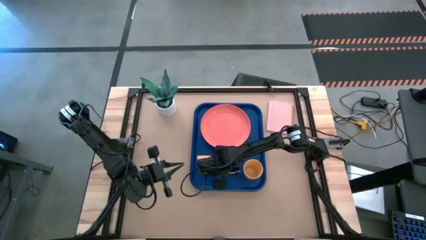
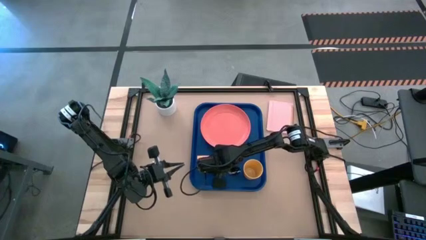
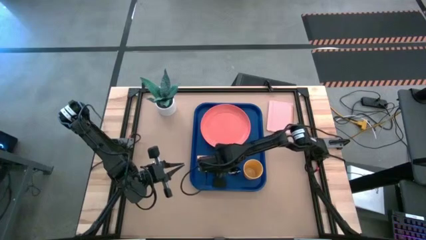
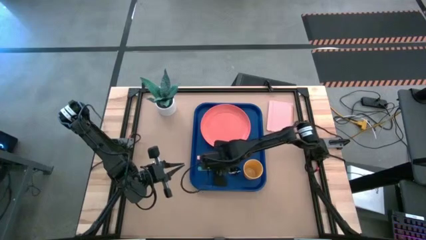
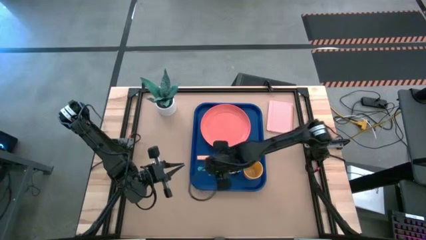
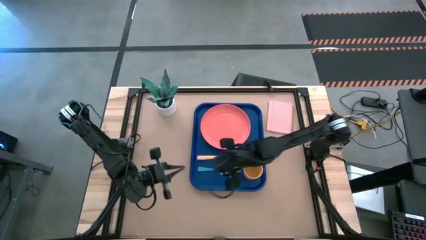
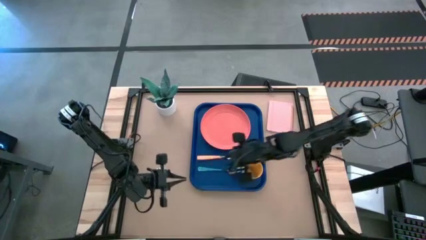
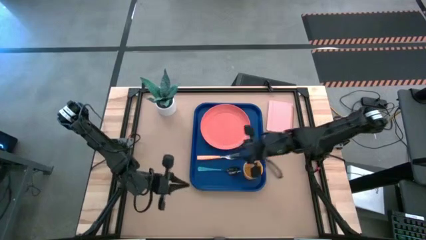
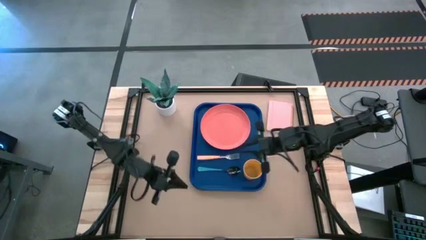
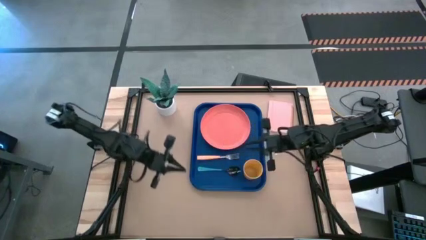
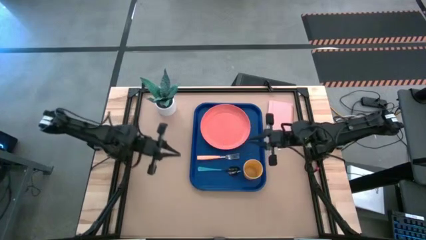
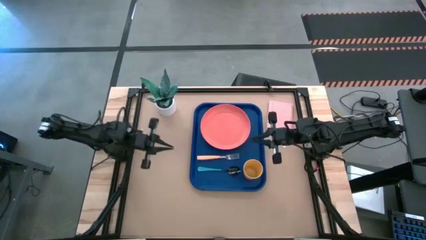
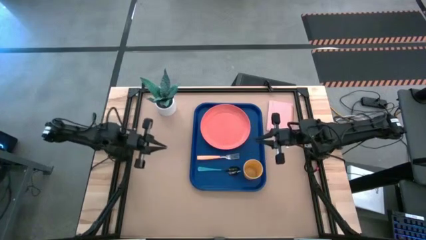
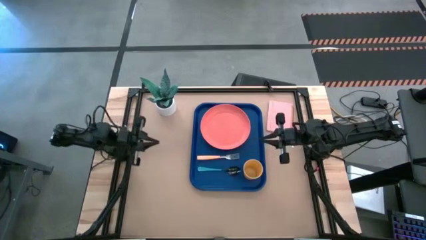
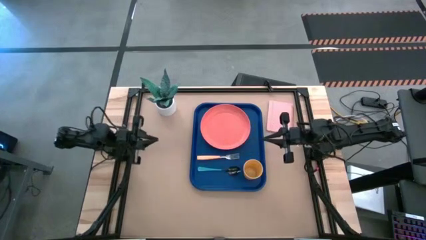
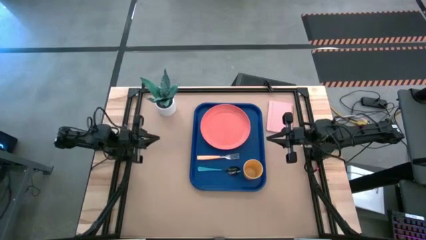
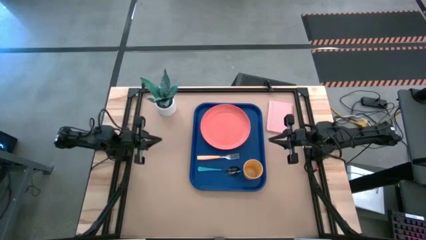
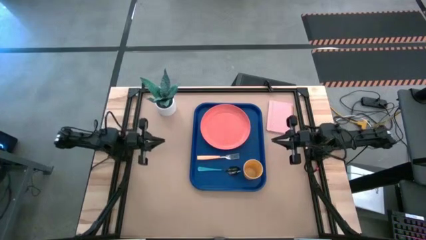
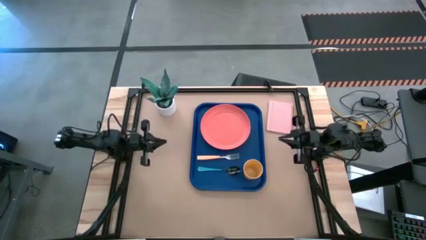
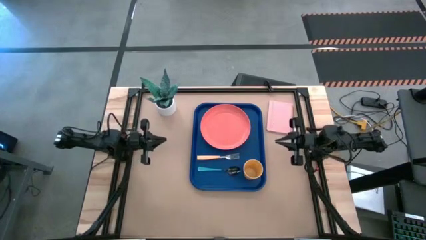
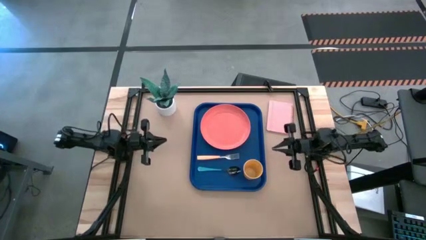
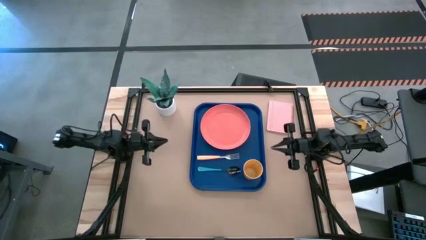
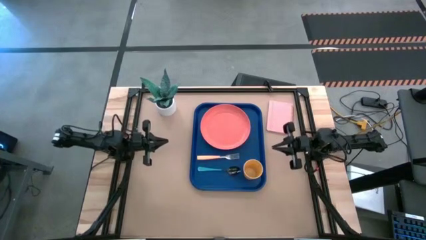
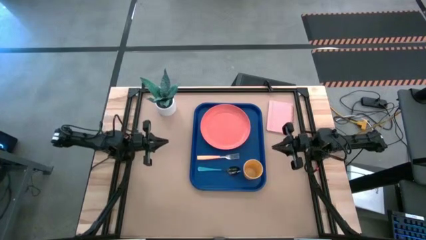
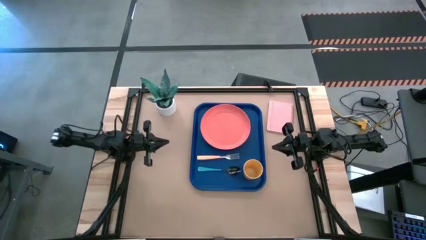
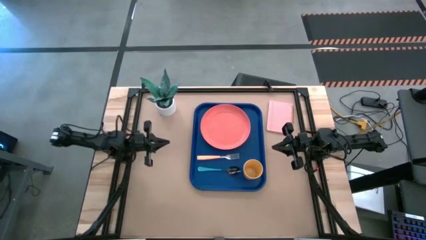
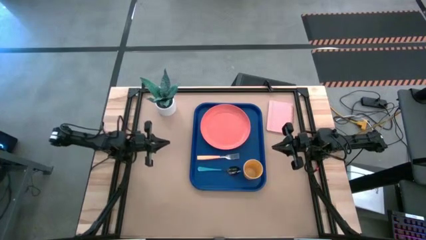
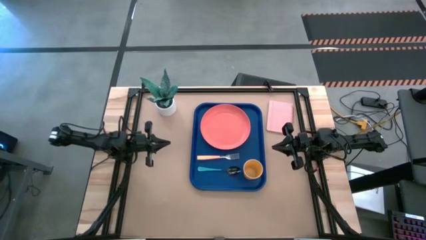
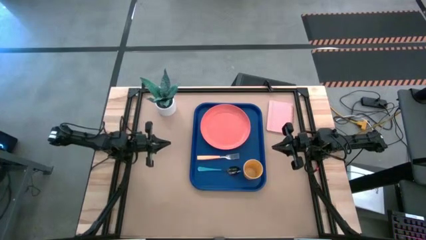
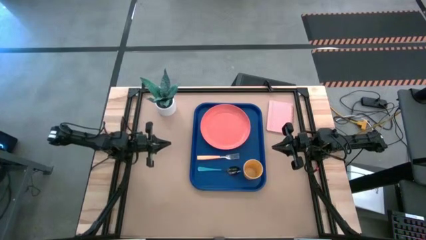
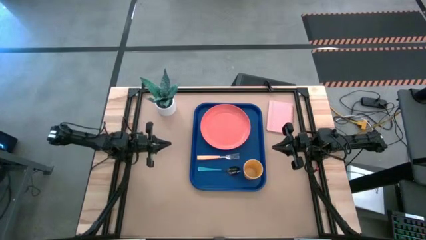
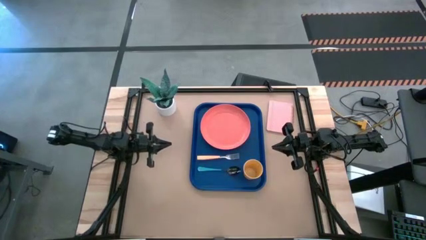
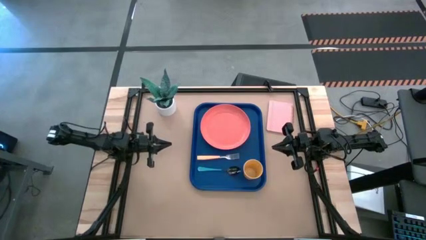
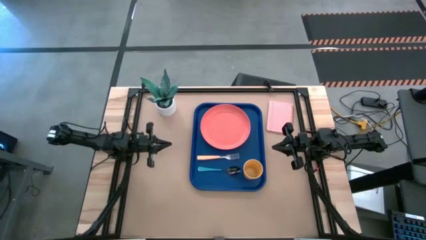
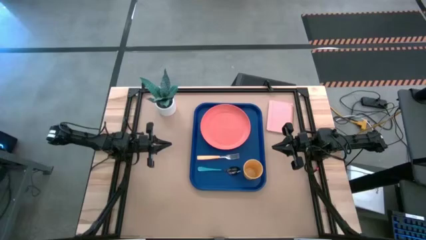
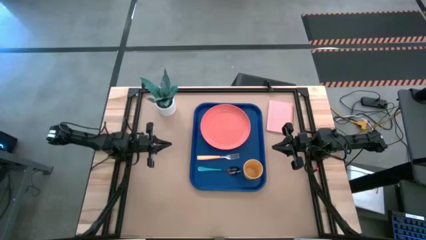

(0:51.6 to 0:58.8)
Task: Pick and place plate/cup/fork/spoon on tray
Return to Home Position

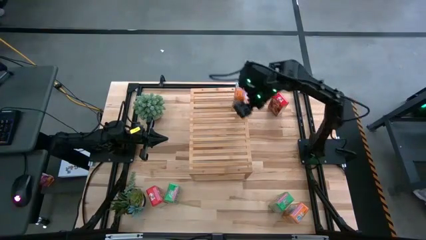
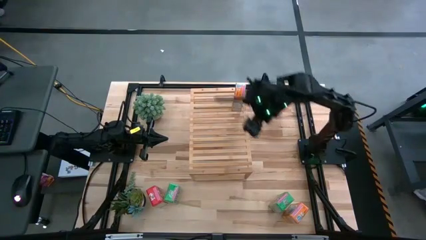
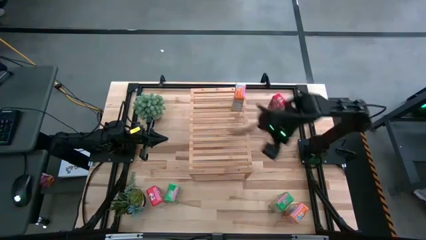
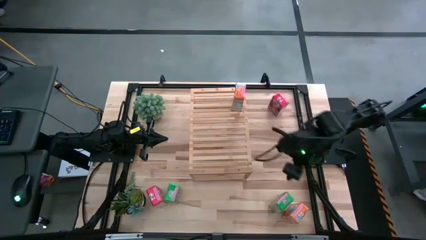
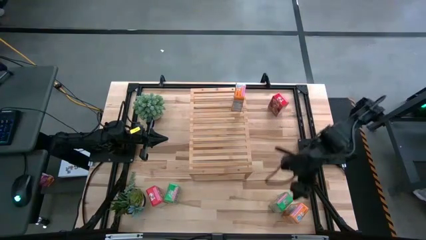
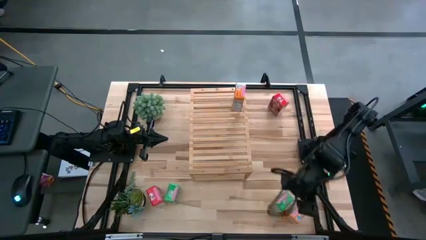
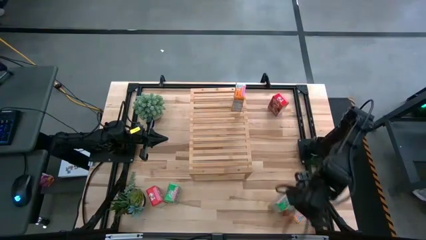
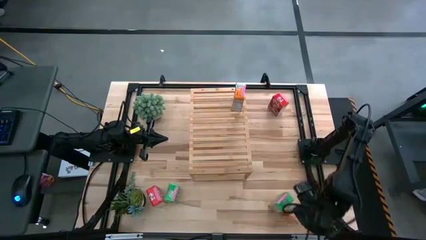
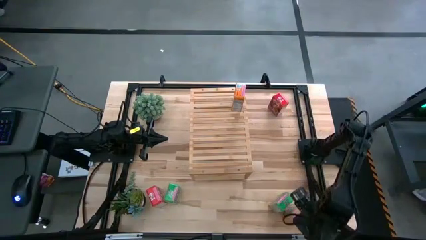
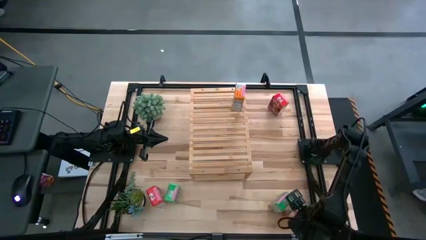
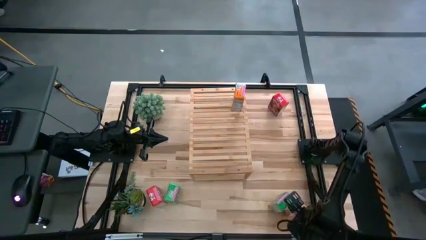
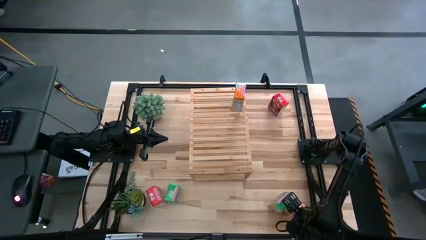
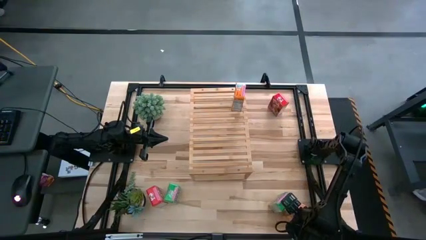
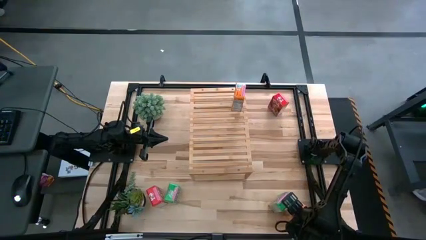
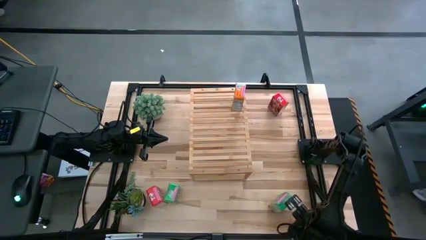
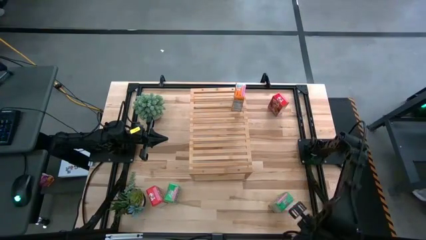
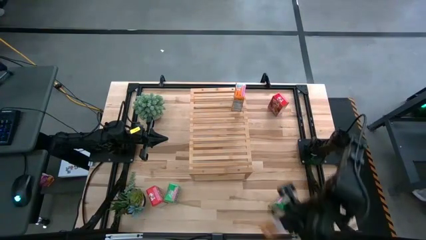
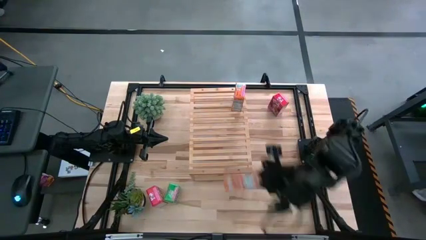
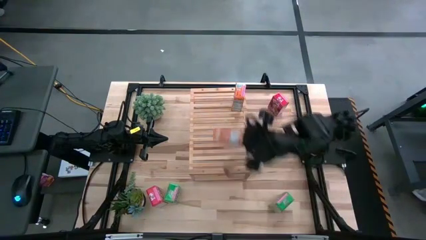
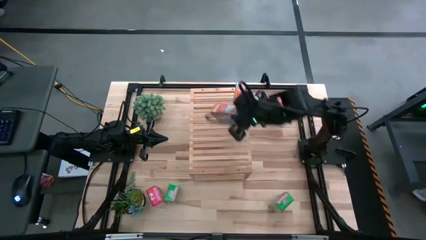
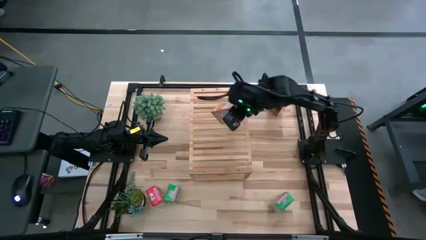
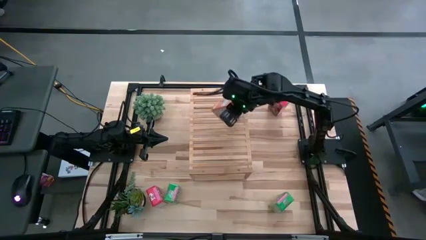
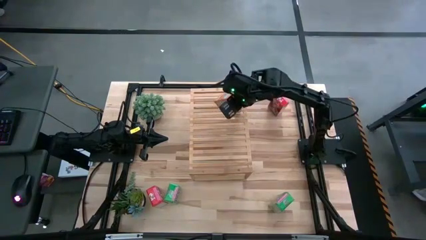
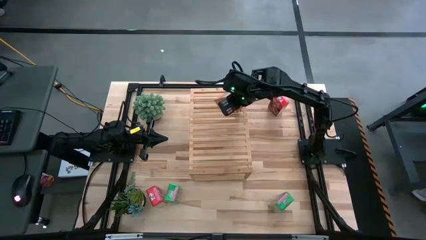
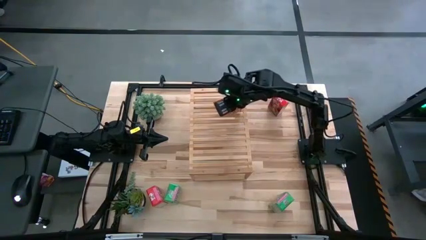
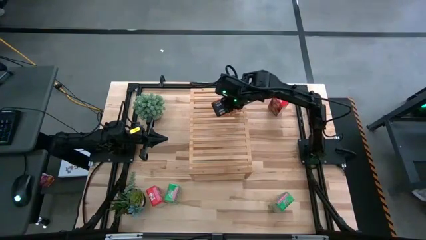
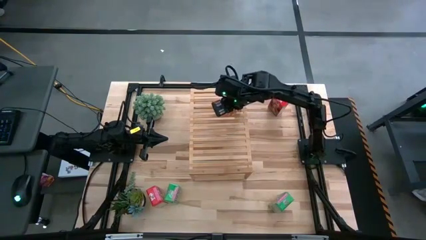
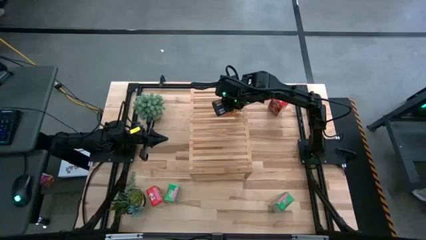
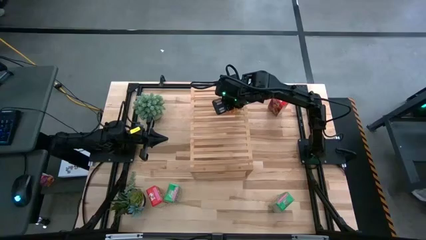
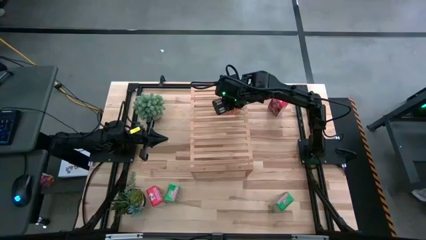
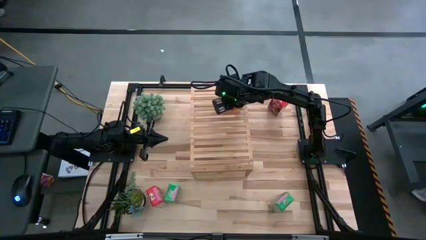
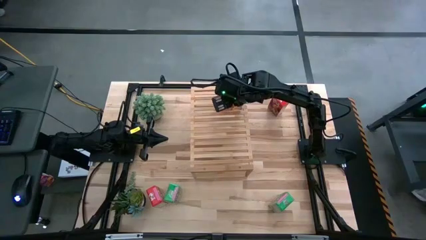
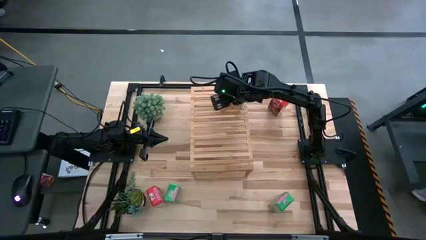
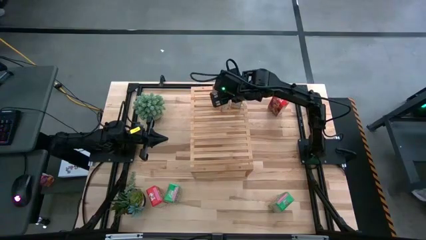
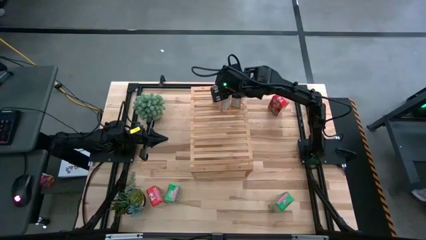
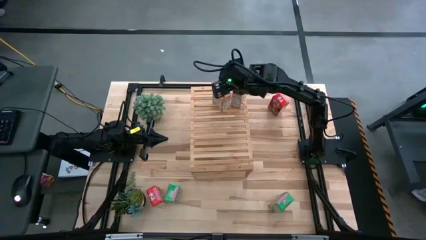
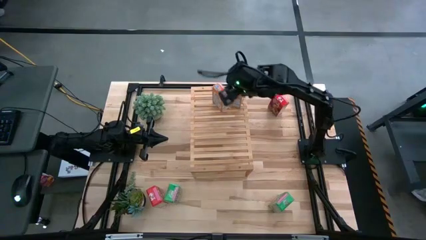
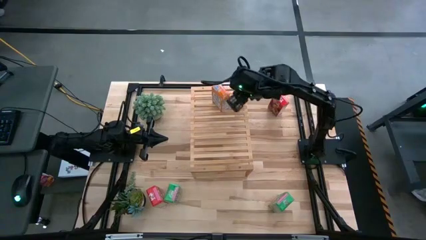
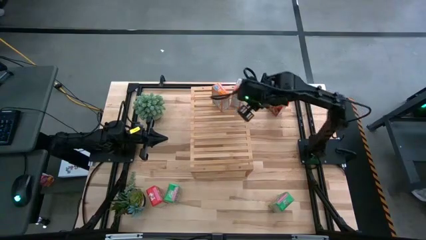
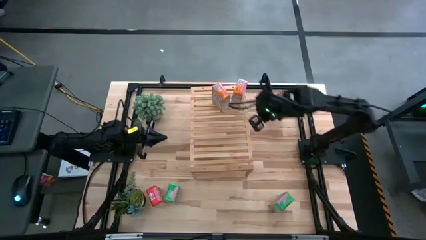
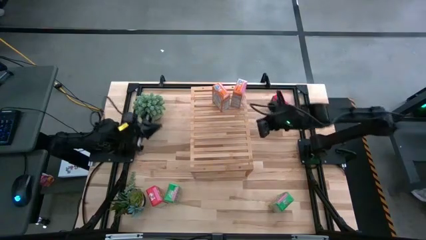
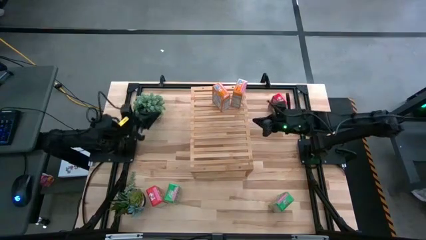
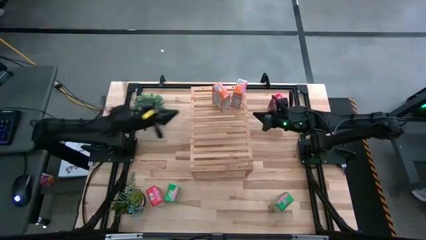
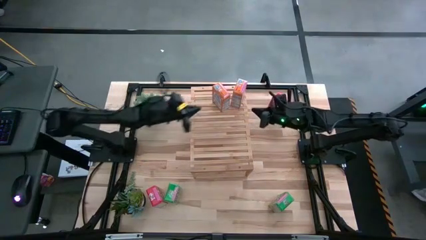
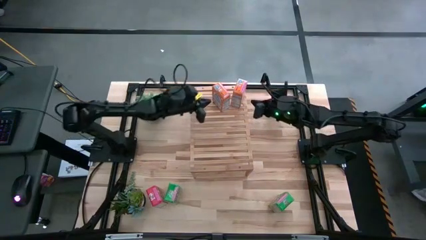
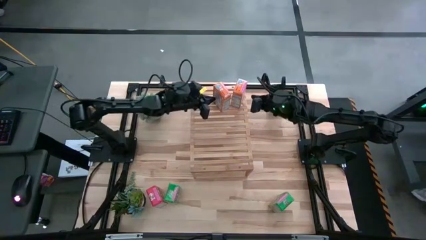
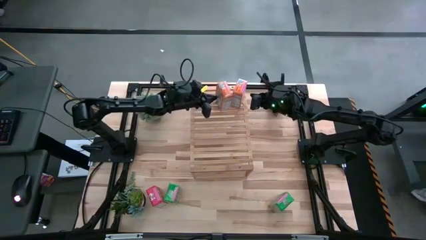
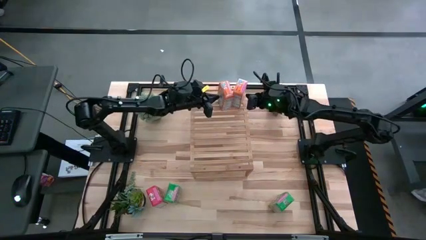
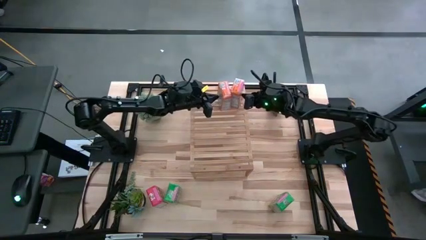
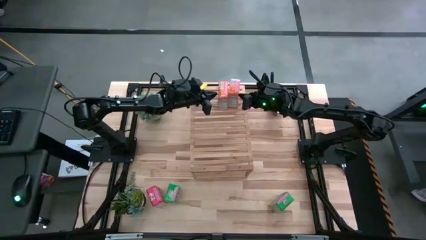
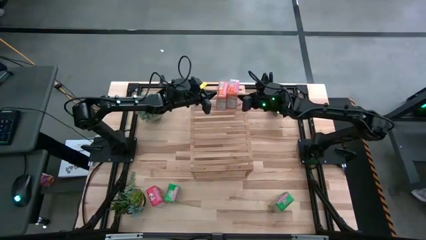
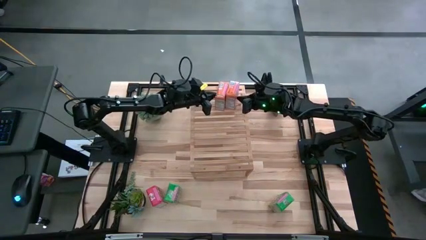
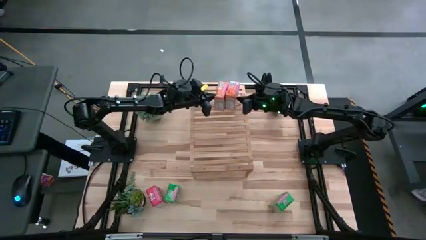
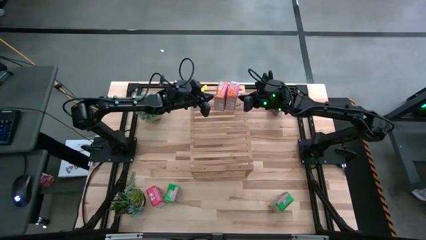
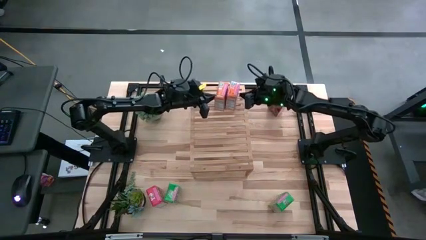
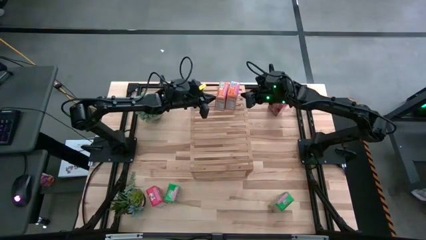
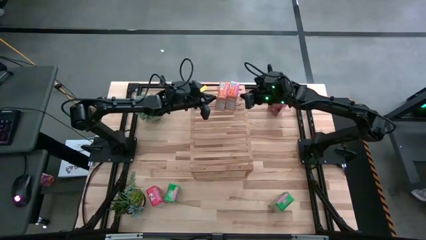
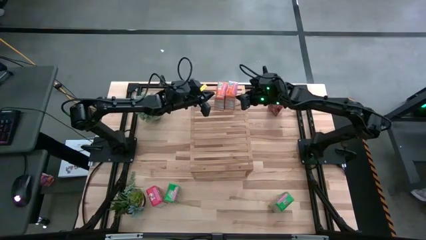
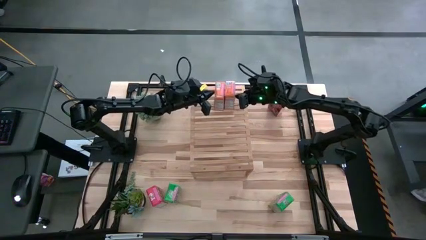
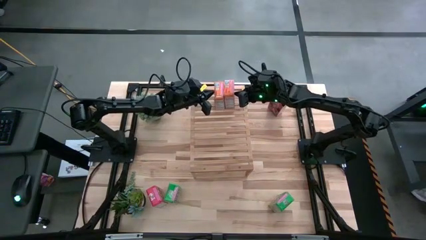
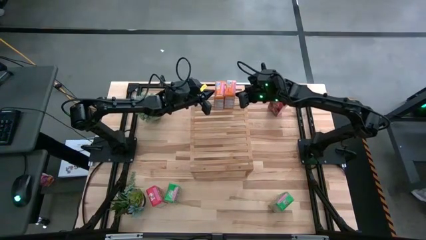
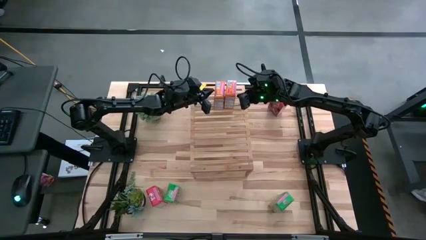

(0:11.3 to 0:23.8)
Task: Stack cereal on shelf
Put the orange cereal box aligned with the other orange cereal box on the shelf
